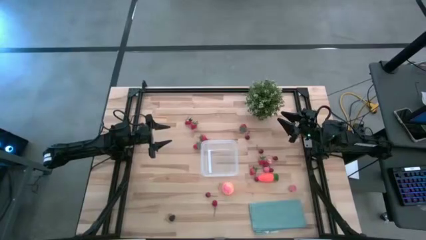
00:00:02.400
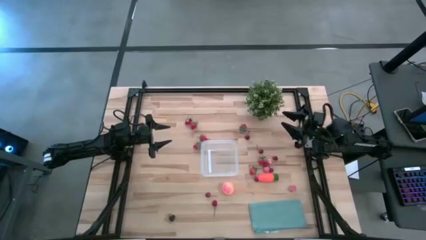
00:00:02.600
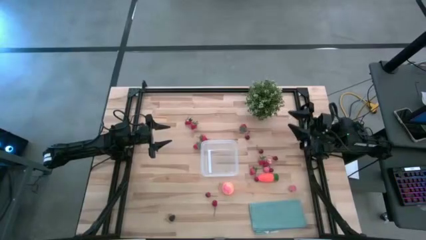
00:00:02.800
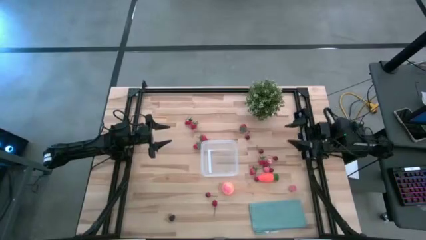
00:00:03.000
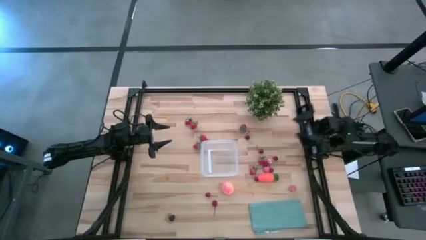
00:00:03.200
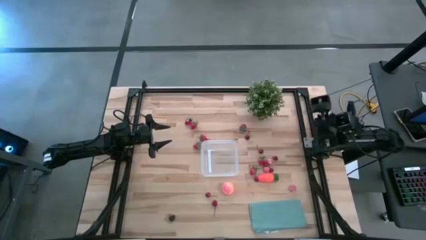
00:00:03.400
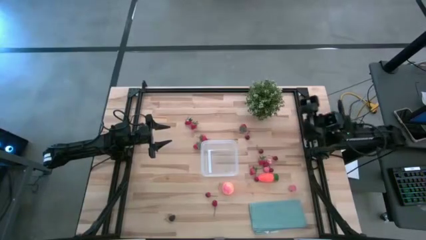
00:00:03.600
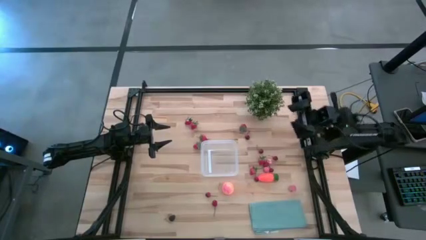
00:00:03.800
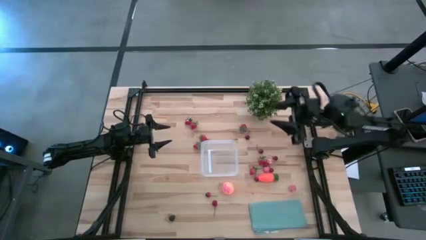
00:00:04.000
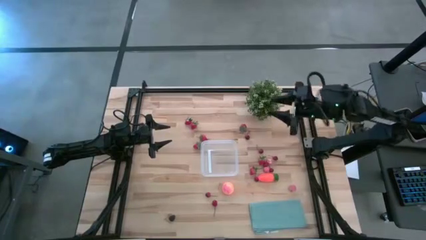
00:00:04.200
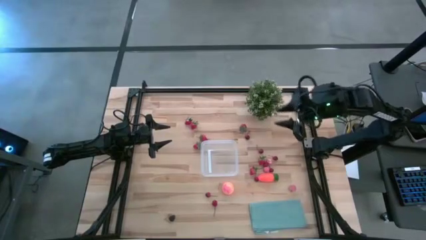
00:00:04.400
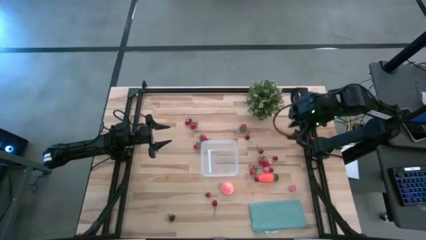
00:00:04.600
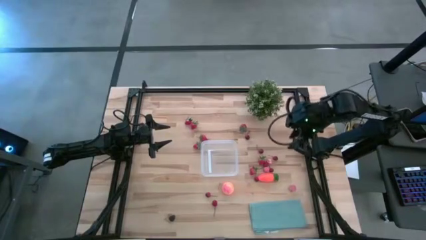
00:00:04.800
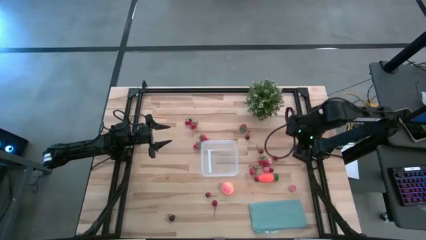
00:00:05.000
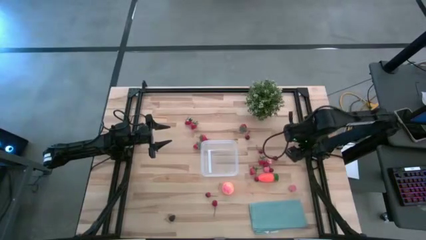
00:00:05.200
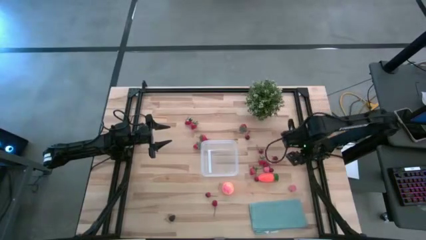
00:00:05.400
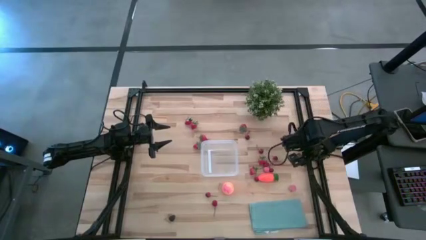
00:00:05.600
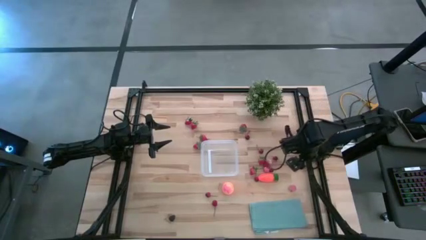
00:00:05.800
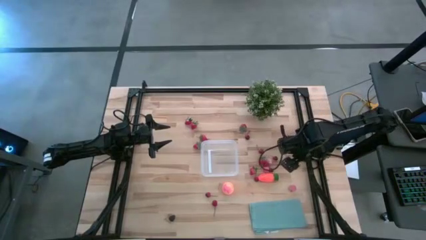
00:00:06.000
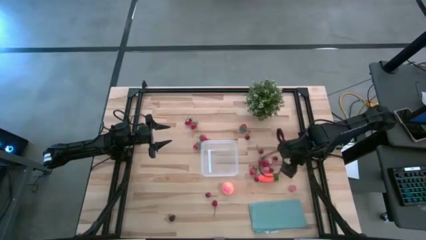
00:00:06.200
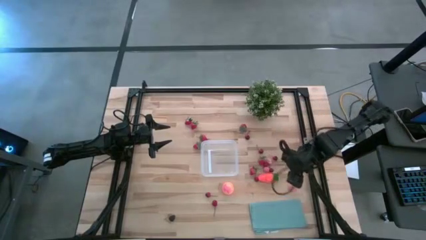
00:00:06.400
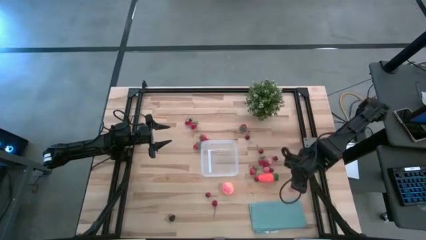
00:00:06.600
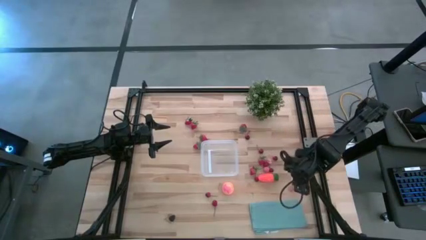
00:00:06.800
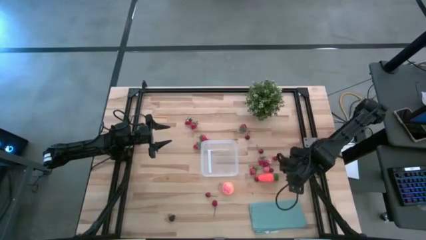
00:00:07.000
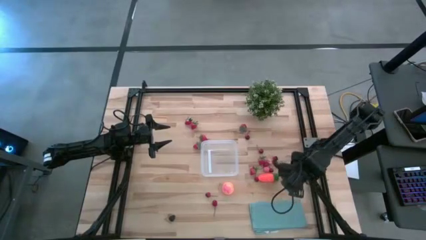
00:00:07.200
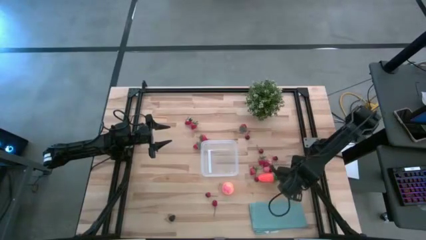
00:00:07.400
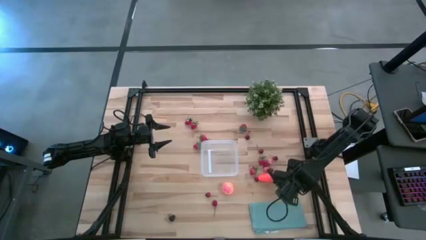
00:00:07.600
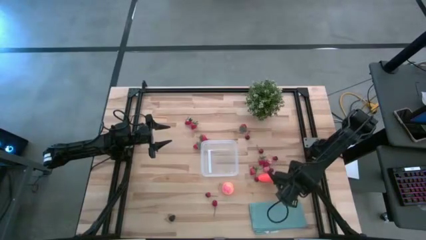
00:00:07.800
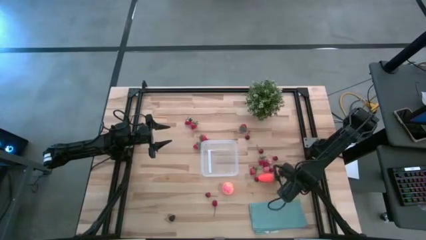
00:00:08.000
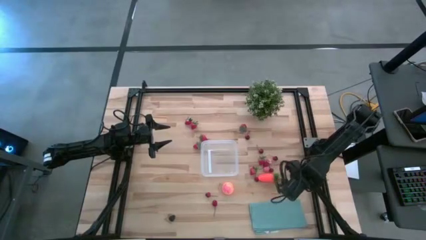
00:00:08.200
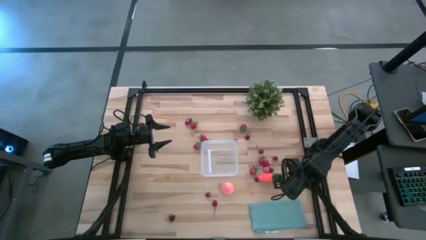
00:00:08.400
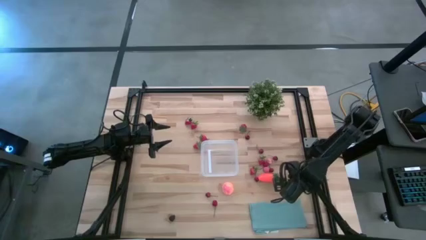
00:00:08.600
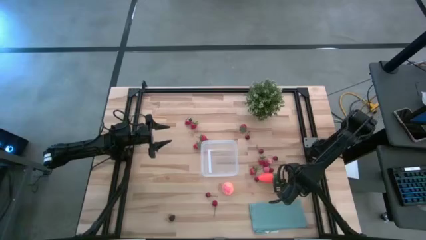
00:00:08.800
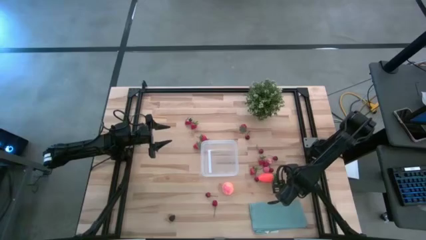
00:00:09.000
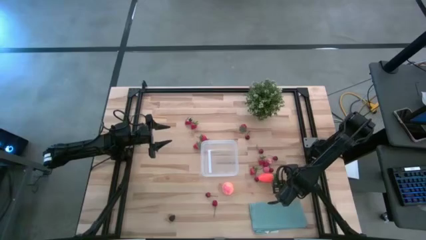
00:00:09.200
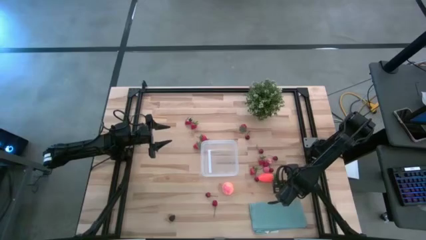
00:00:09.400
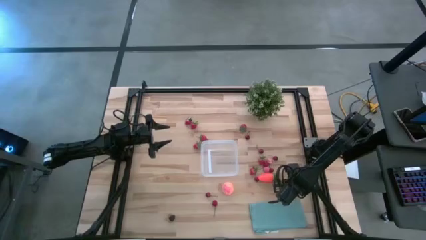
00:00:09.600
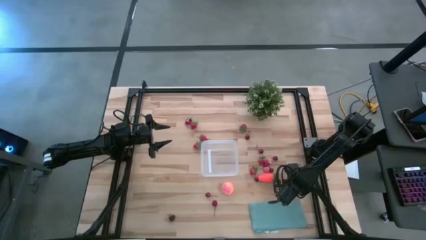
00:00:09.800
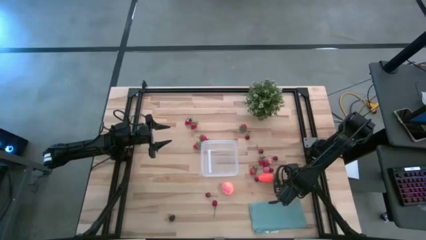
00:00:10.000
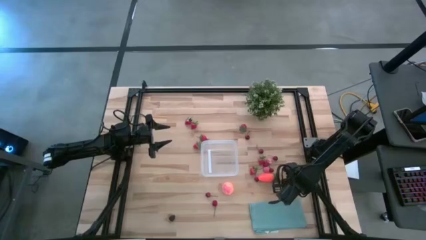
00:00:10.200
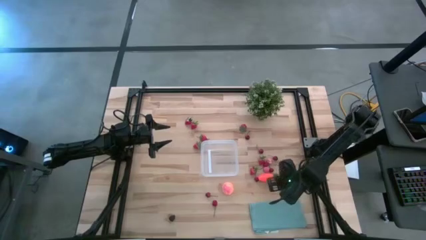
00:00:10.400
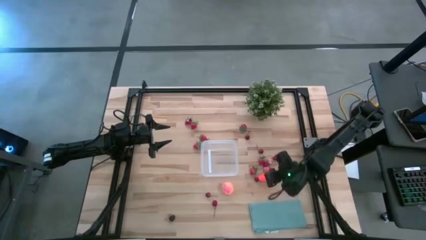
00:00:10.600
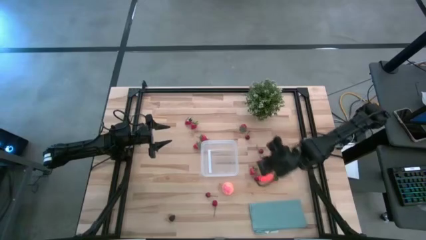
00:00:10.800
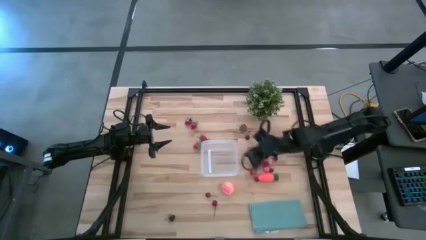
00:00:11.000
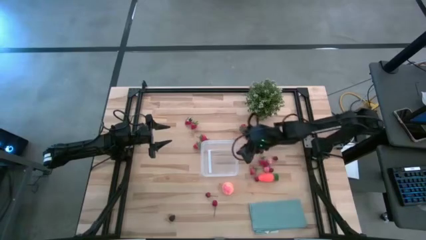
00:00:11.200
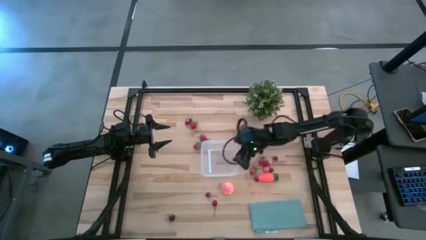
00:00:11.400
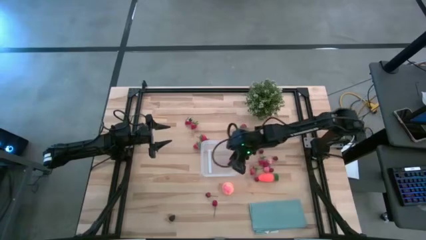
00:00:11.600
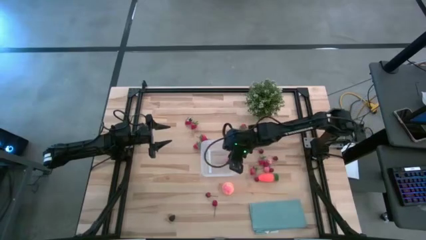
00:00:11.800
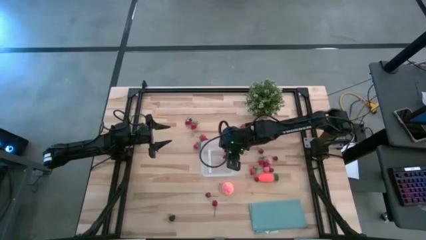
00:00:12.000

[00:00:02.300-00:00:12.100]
Task: Pick and placing Produce into tupperware
Put the peach into the transparent bin

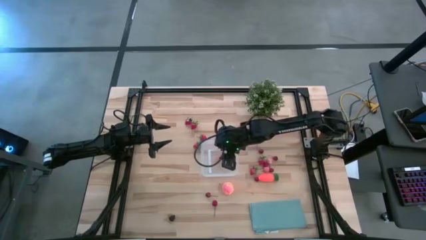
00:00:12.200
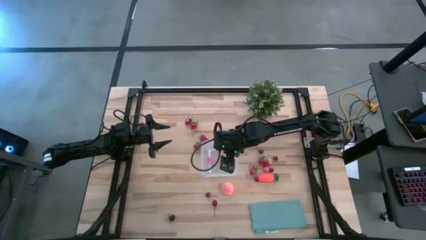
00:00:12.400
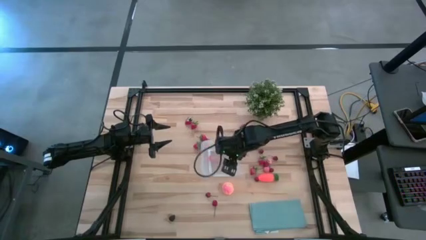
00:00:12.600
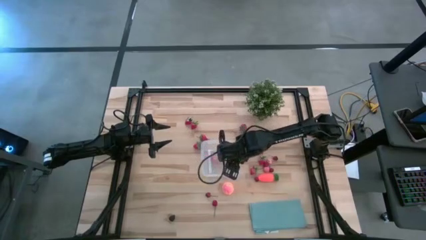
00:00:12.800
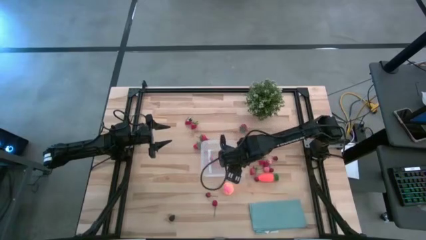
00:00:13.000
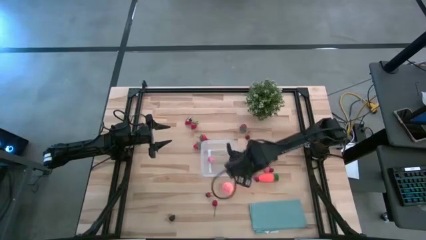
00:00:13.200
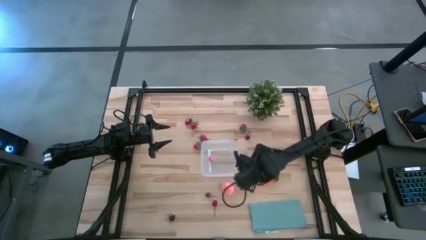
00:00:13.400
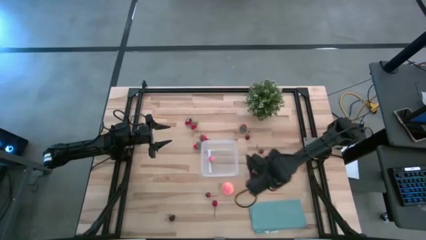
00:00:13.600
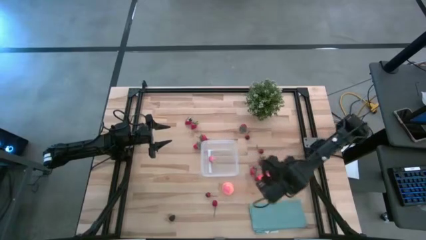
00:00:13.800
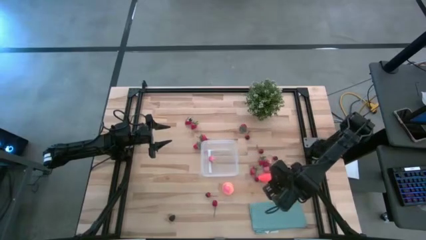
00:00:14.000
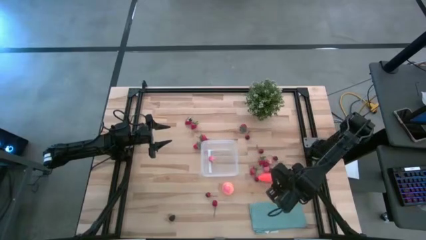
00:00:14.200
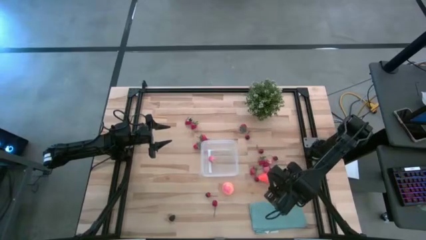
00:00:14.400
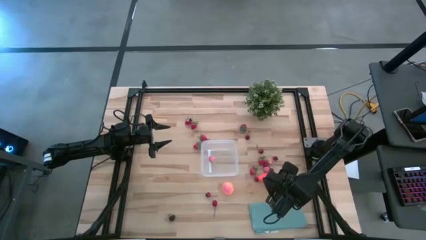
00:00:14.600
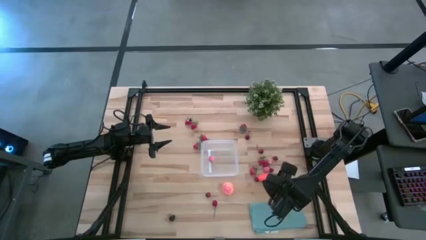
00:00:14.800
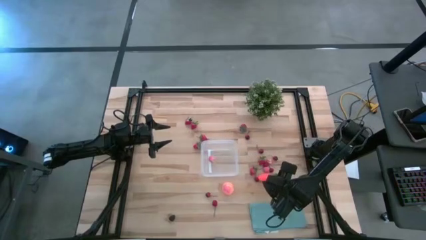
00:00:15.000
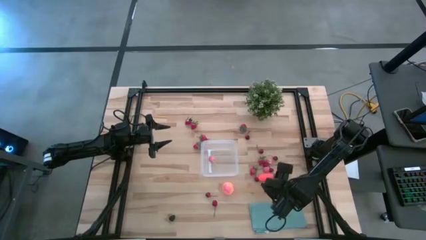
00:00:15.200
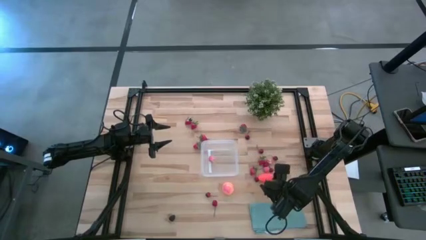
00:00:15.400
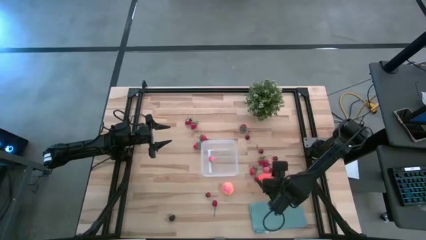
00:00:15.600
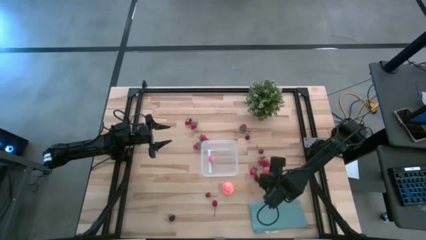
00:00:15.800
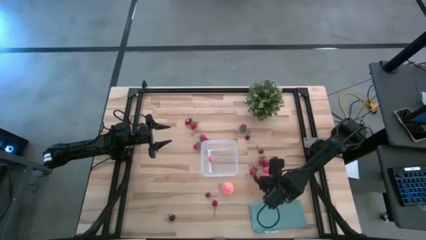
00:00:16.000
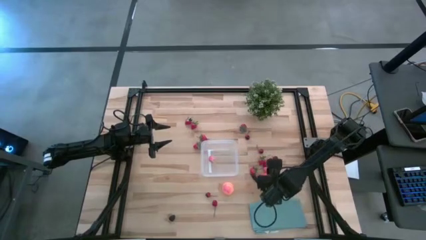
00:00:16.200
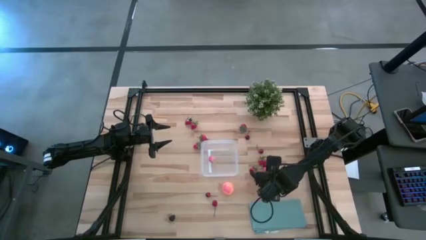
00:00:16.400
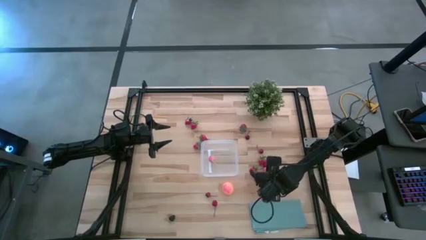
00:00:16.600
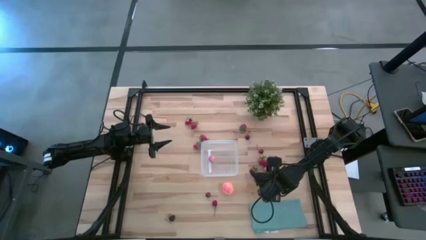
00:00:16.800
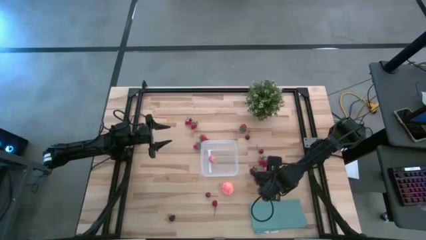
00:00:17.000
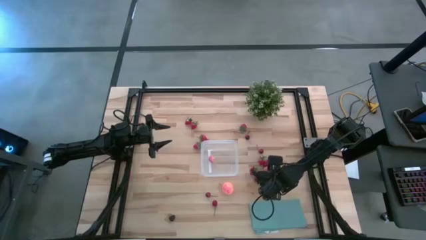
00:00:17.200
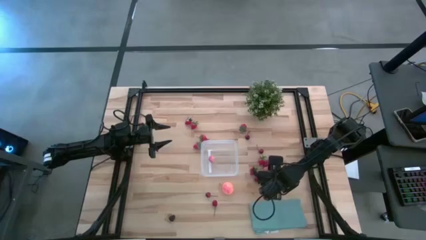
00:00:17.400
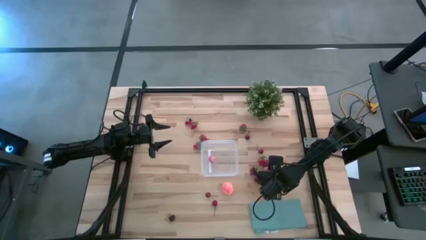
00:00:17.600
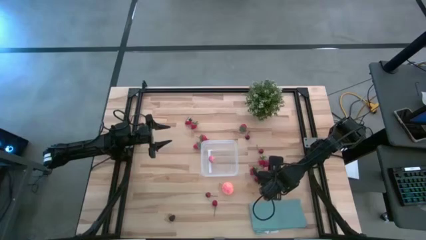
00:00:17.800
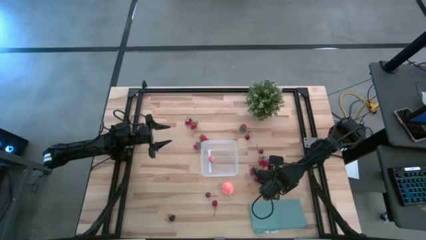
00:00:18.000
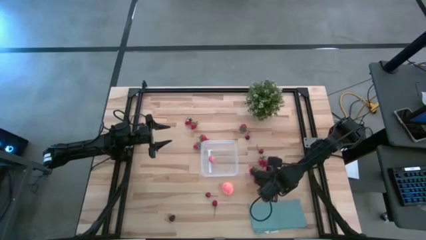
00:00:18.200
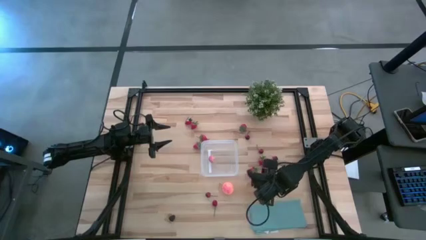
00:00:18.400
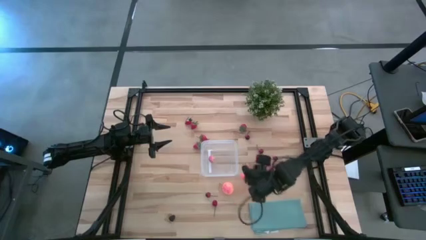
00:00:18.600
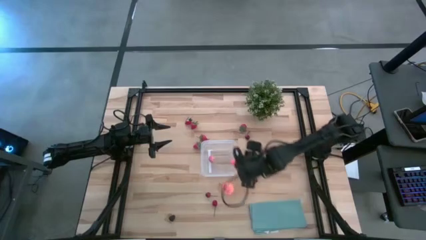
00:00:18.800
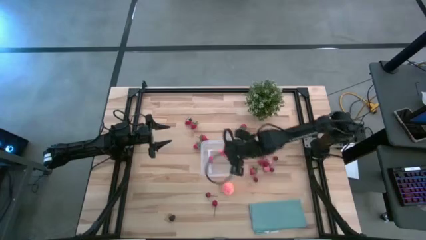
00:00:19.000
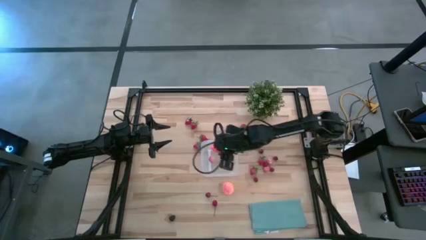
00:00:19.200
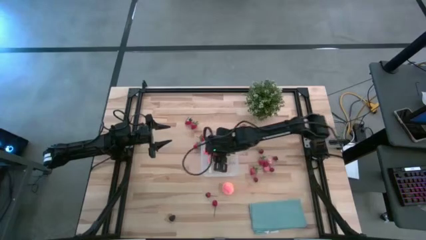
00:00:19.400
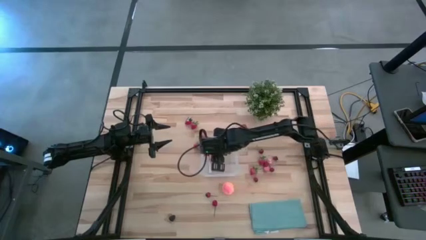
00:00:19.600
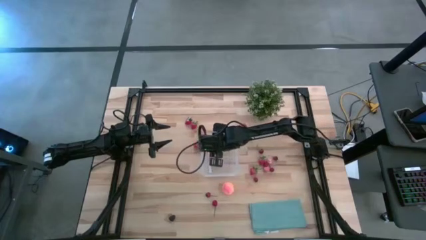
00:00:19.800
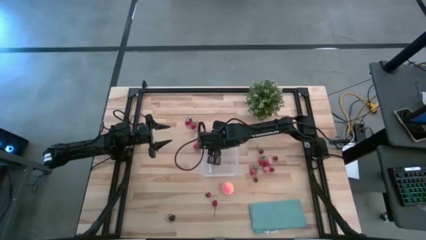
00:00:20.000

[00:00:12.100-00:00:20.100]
Put the carrot into the transparent bin
